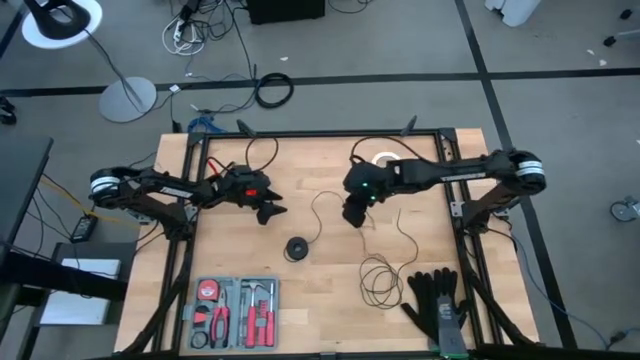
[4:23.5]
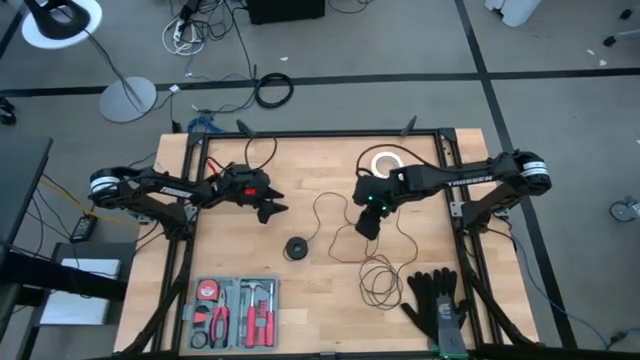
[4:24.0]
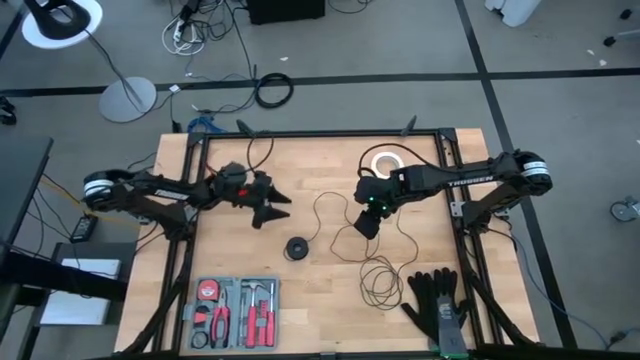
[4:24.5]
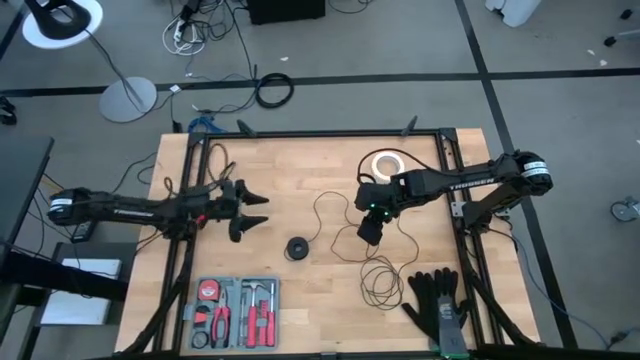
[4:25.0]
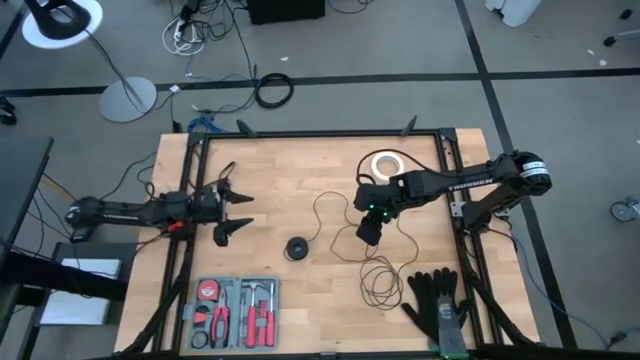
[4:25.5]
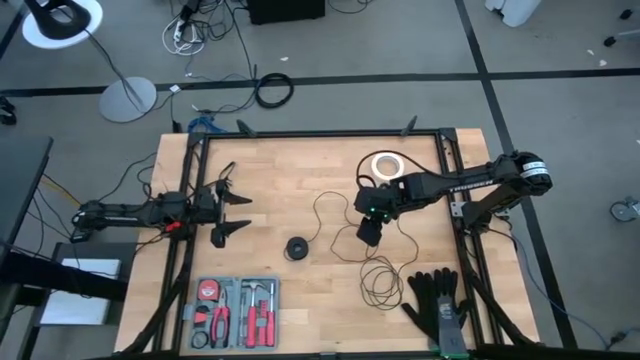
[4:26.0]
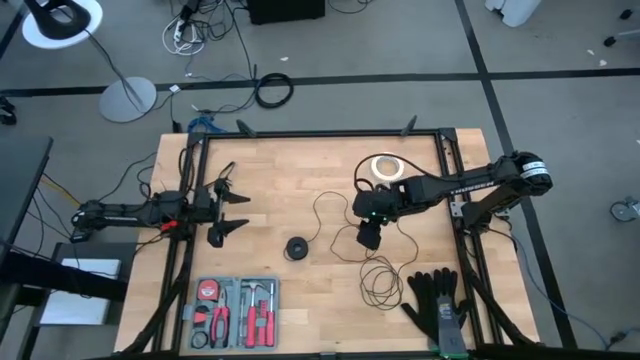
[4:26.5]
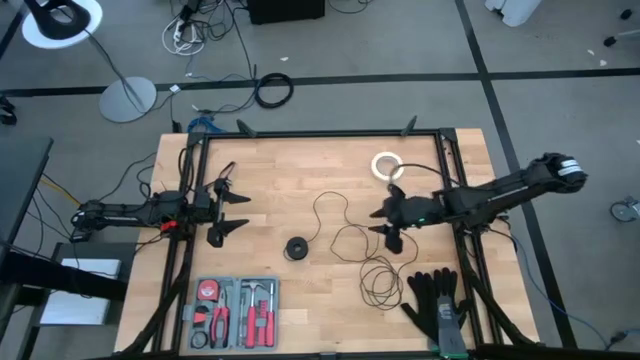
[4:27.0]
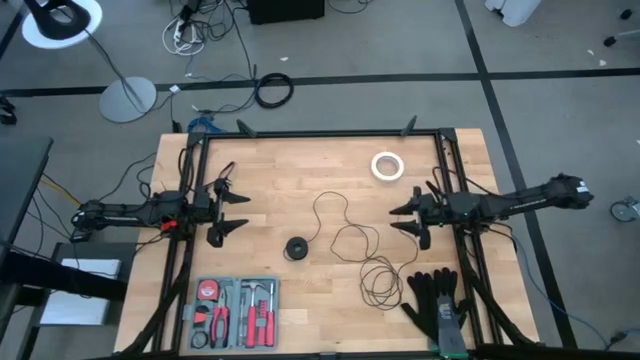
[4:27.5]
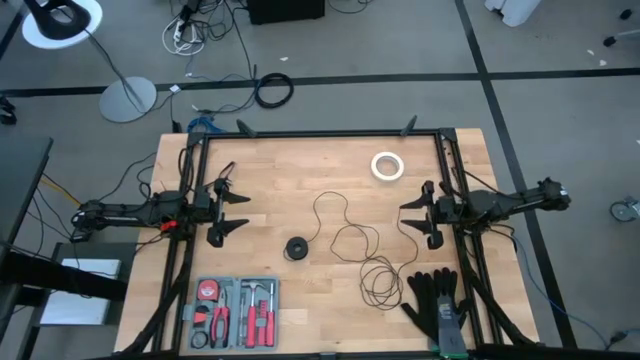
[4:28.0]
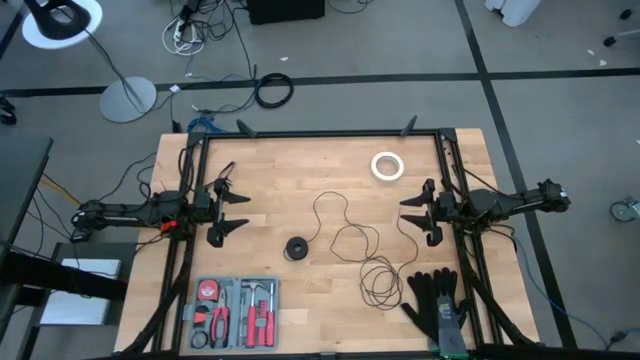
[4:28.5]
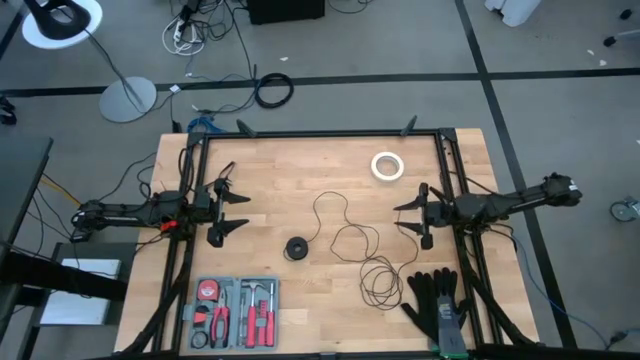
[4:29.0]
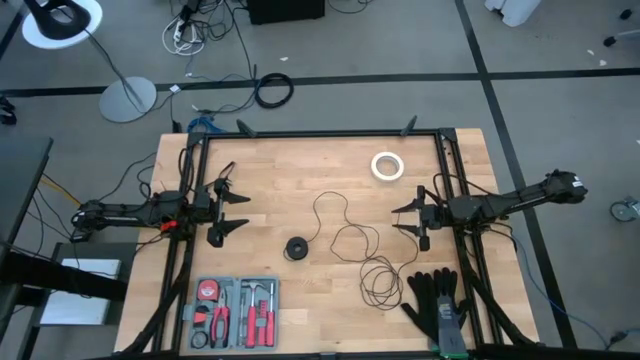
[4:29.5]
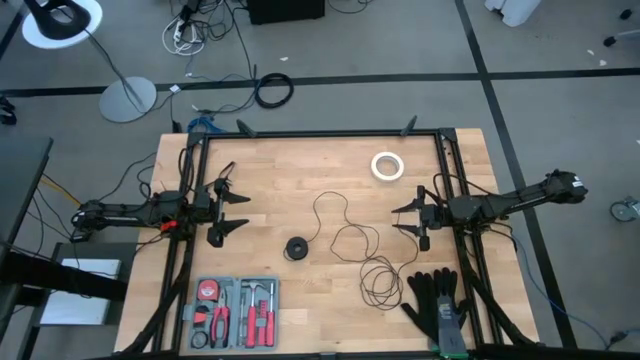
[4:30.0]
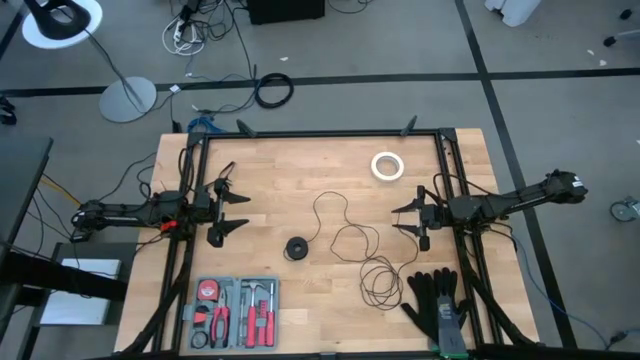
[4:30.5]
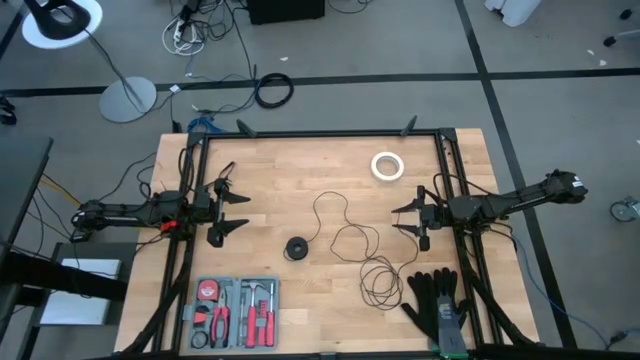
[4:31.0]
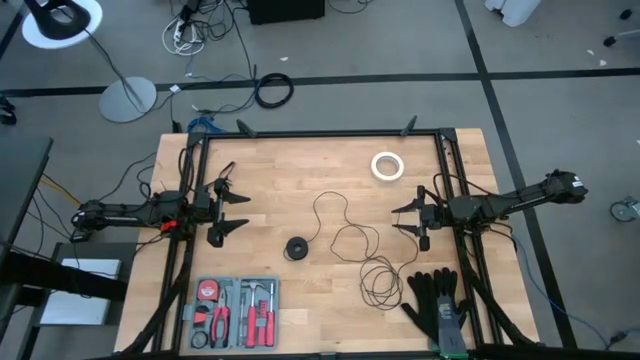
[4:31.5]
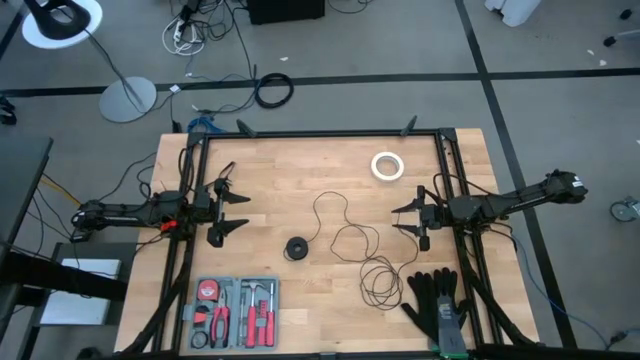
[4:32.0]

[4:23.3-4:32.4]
Task: Coil cords
Return to Home Position

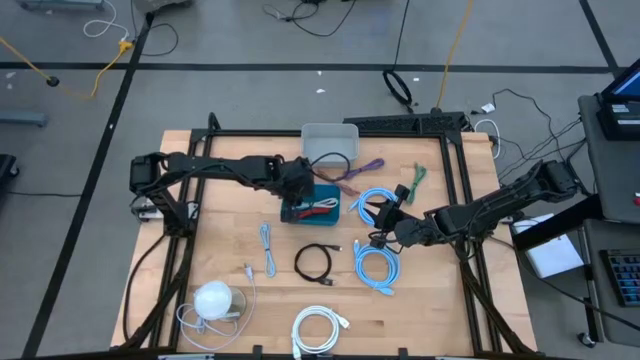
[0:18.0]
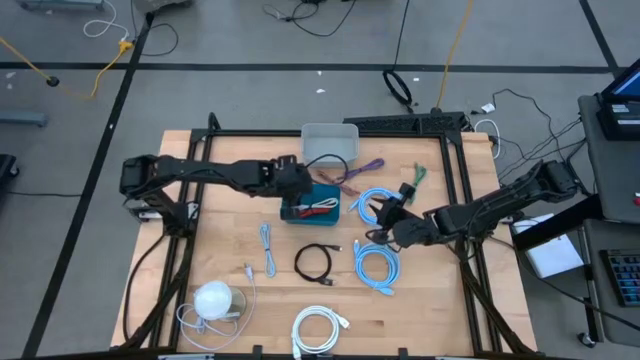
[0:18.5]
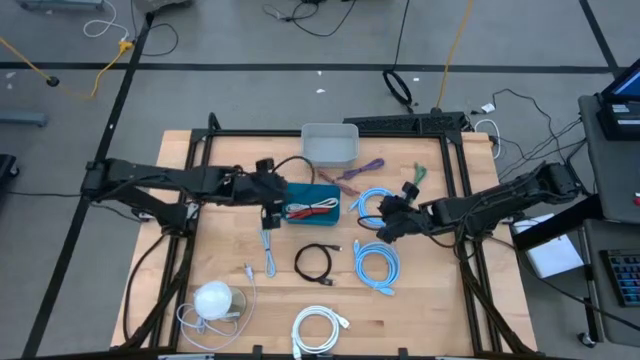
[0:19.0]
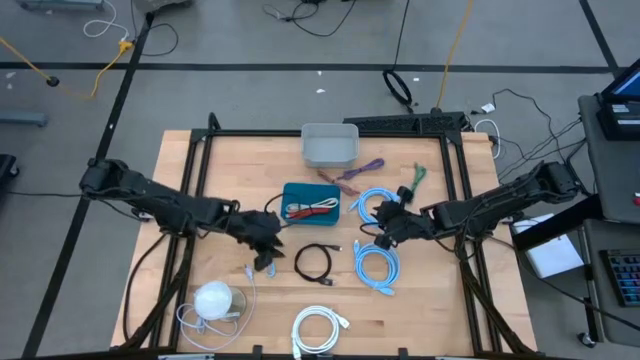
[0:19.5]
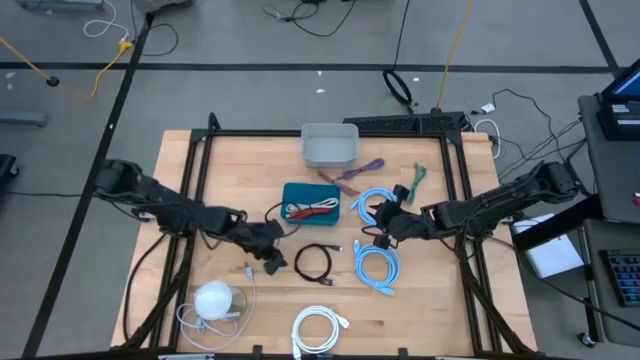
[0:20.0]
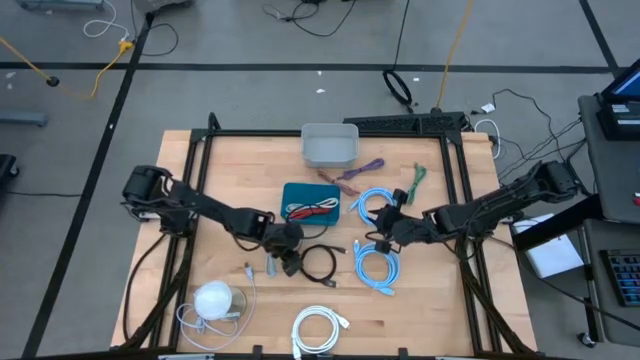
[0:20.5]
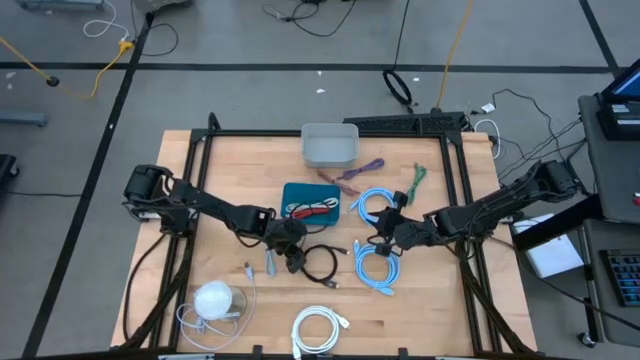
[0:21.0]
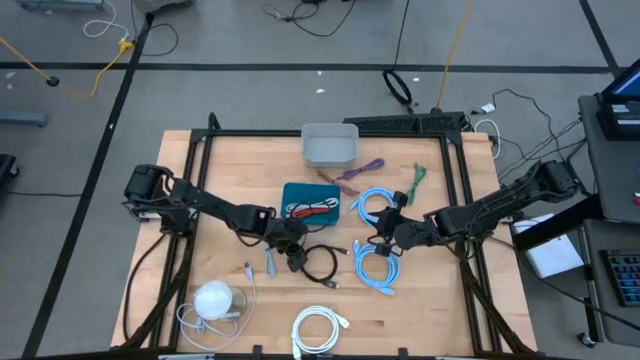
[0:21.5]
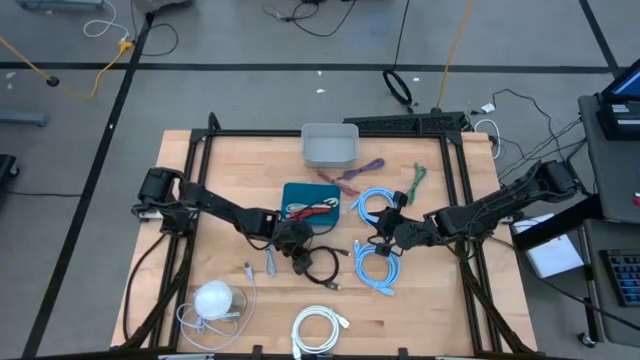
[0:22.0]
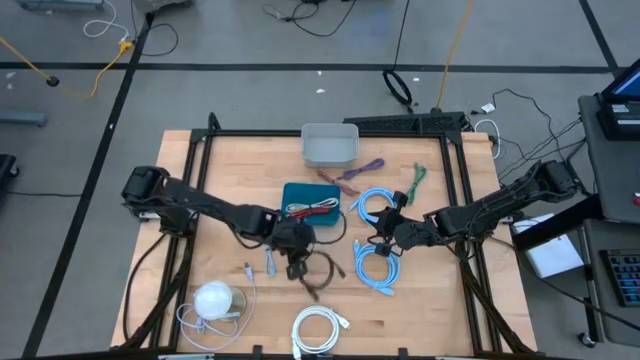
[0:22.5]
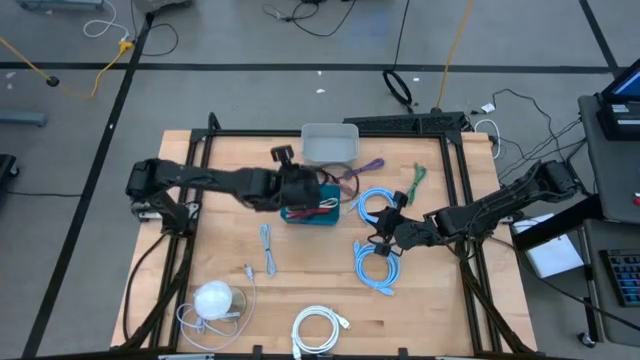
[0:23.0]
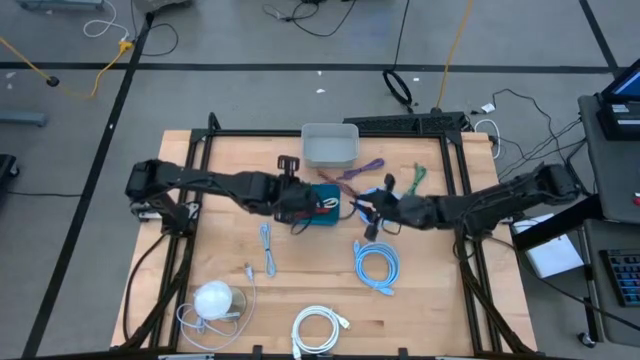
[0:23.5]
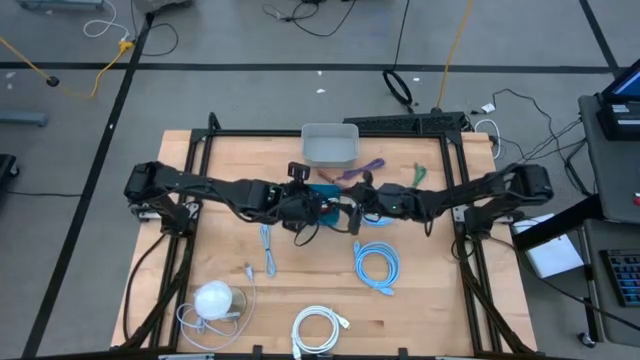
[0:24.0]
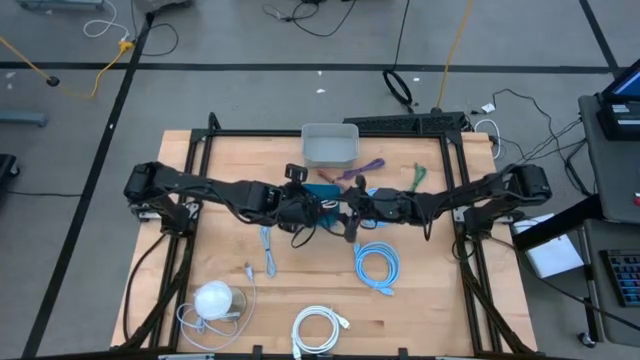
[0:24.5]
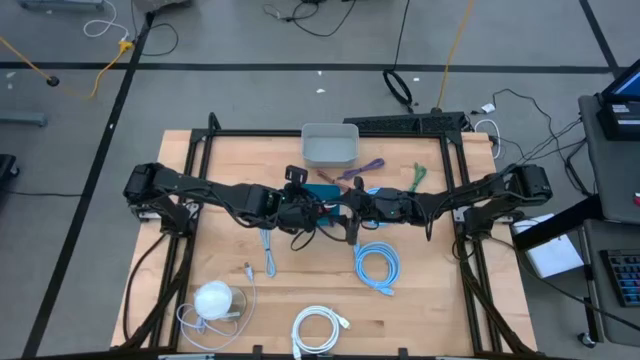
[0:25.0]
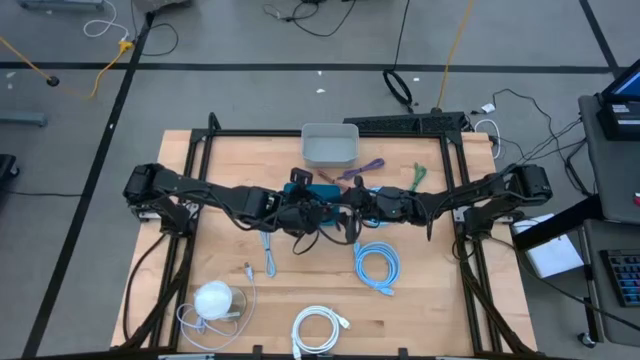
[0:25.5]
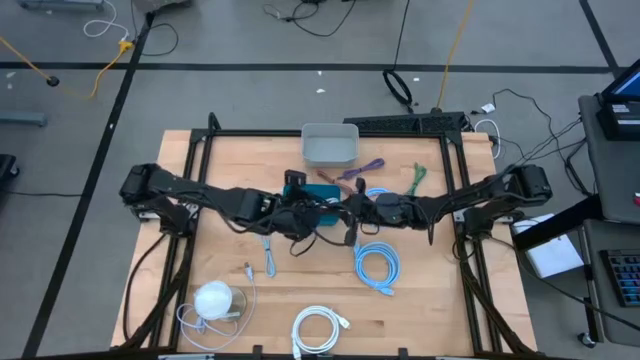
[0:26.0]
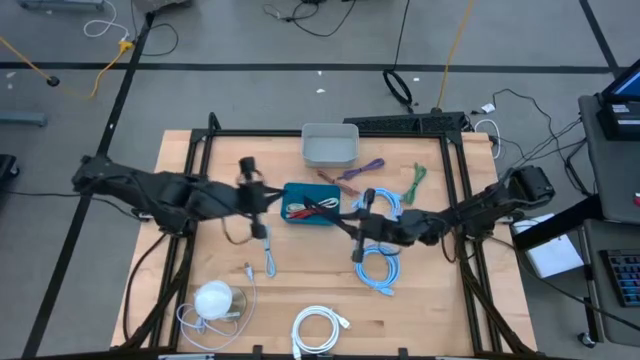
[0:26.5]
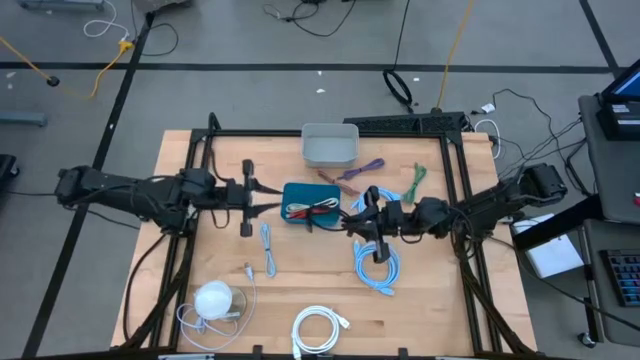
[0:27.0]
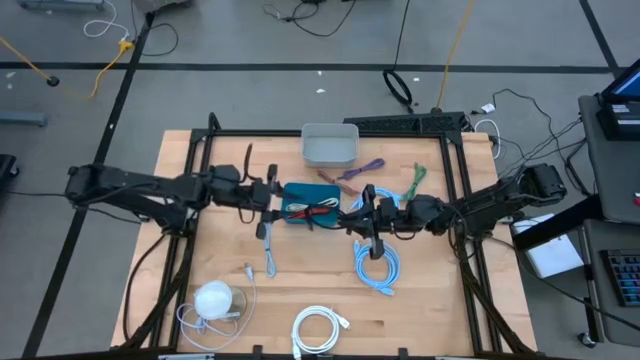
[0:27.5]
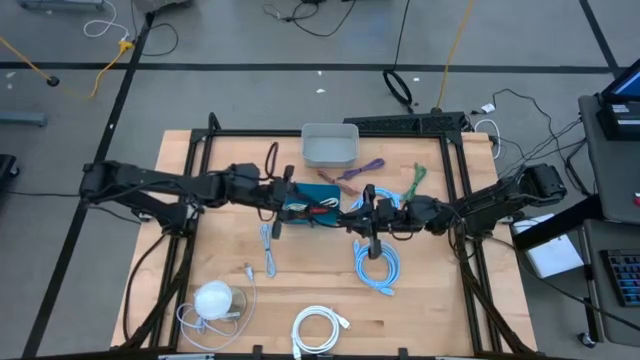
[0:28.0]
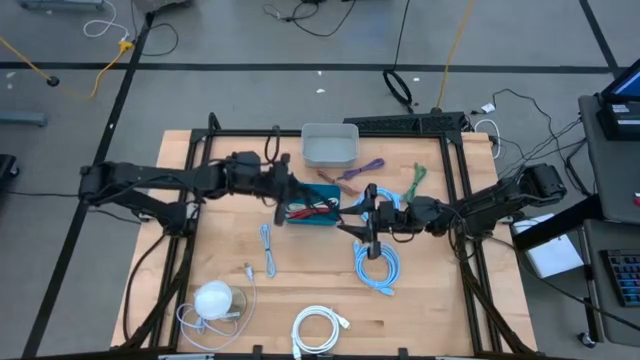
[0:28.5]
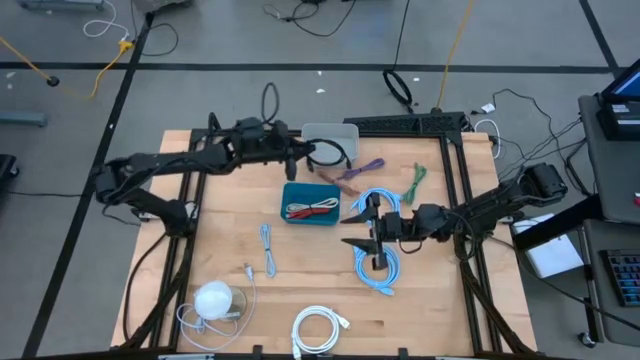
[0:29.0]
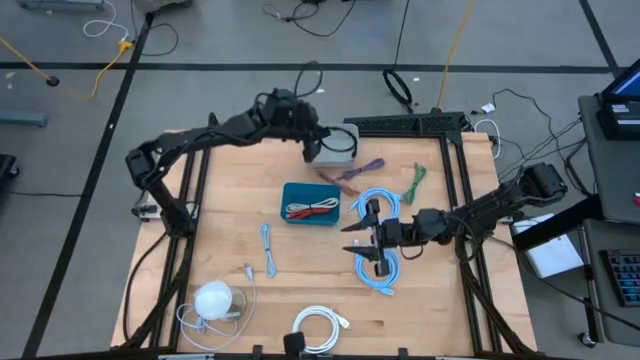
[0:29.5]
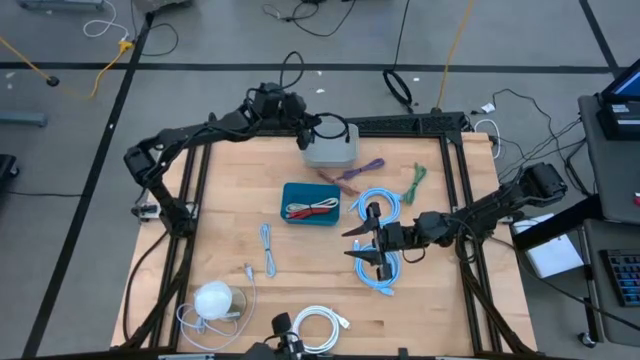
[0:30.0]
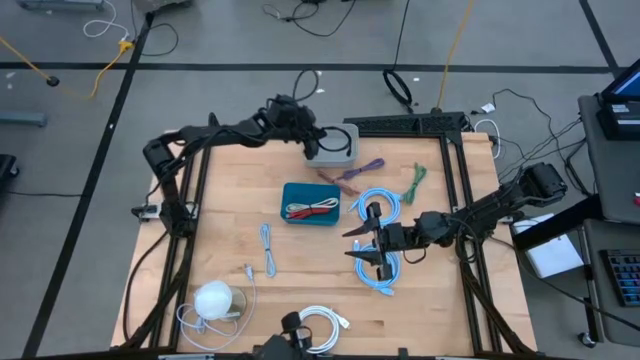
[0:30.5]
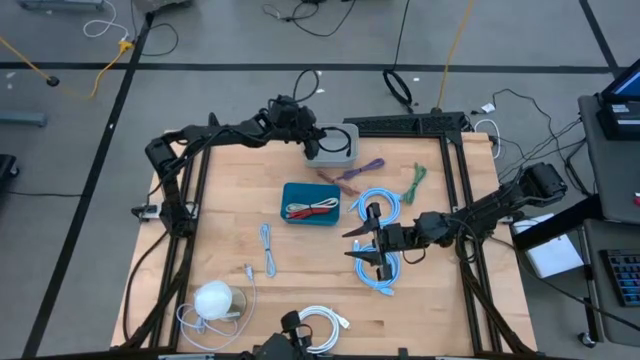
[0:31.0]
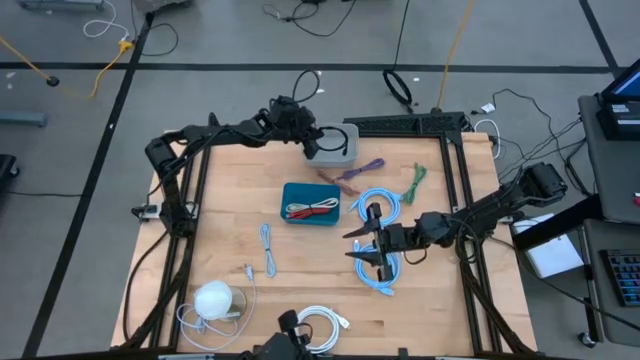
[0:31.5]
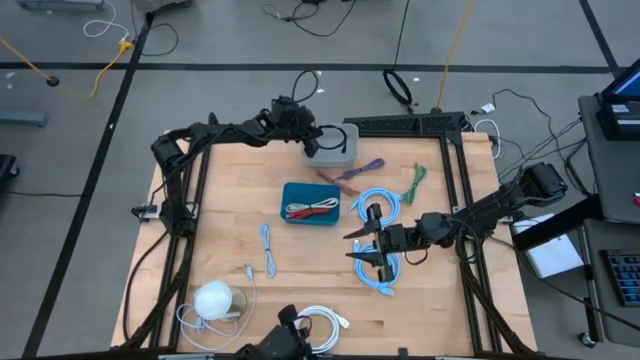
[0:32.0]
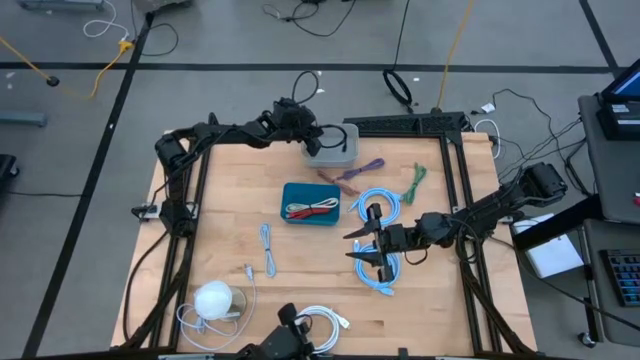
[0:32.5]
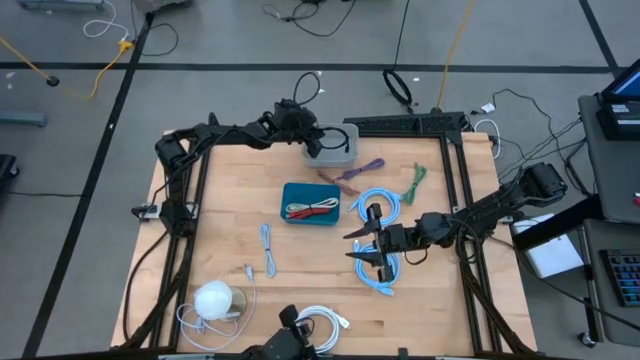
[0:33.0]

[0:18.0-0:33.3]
Task: Pick & Place USB Port
Put the black HDMI cable into the gray bin
